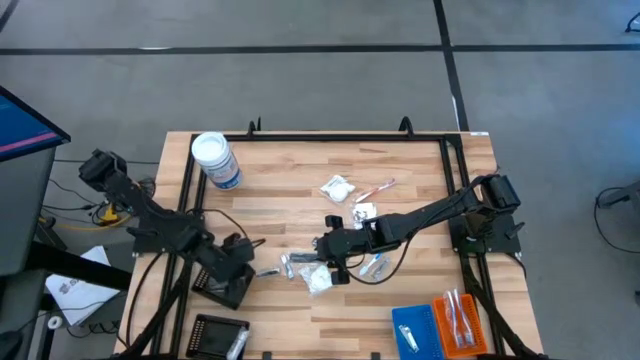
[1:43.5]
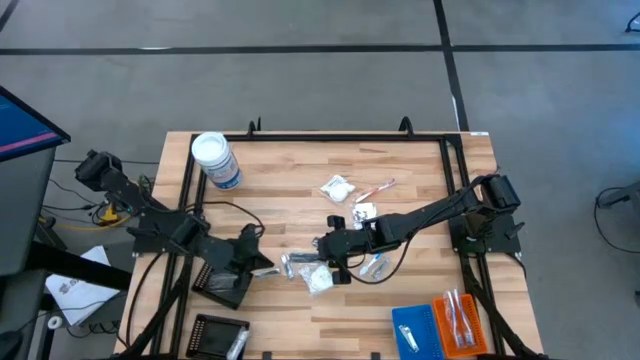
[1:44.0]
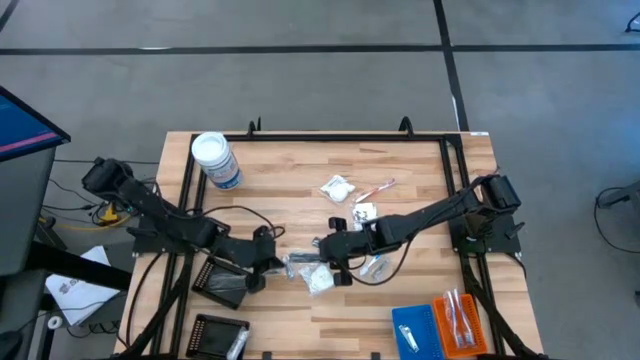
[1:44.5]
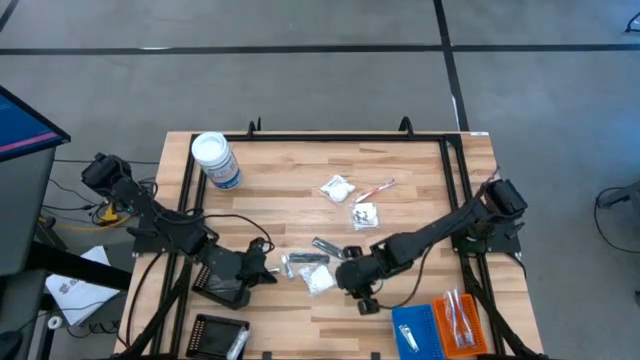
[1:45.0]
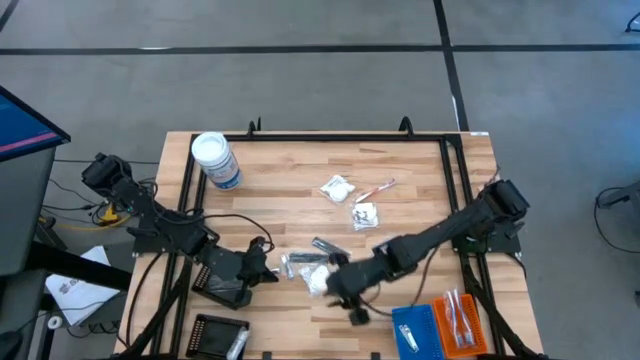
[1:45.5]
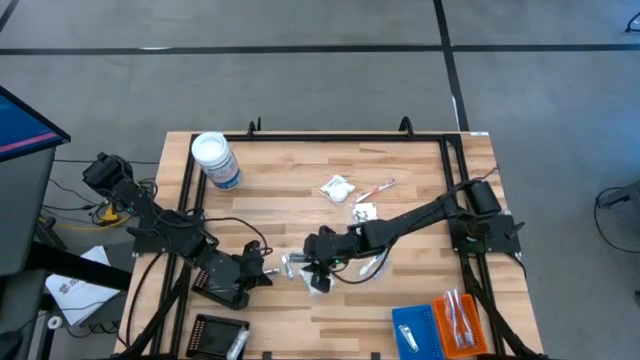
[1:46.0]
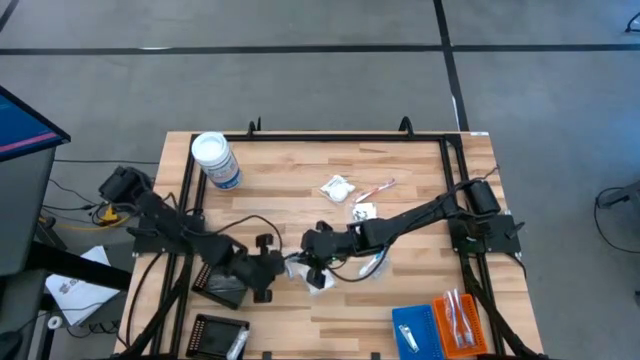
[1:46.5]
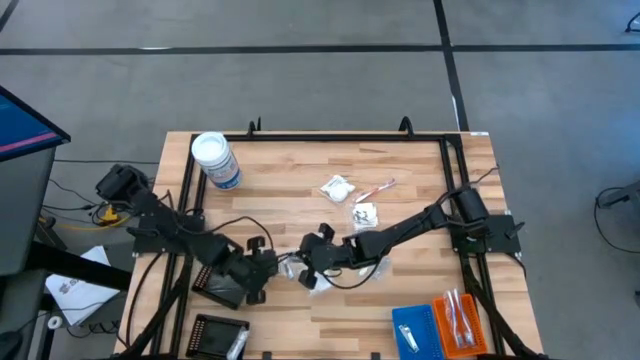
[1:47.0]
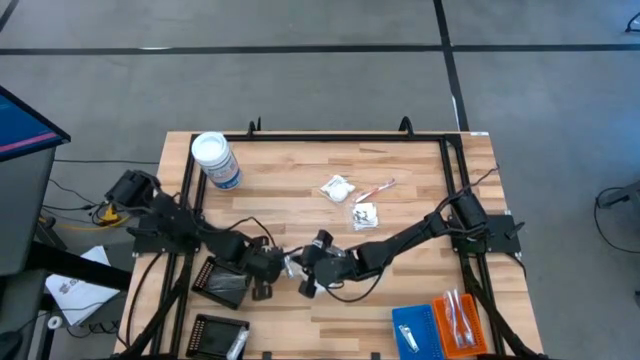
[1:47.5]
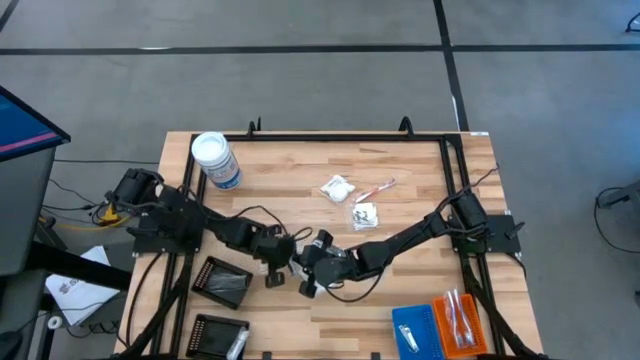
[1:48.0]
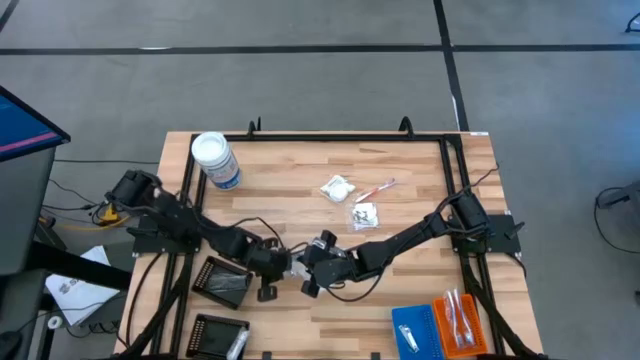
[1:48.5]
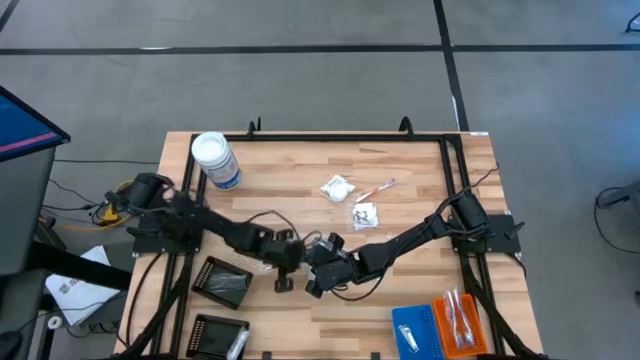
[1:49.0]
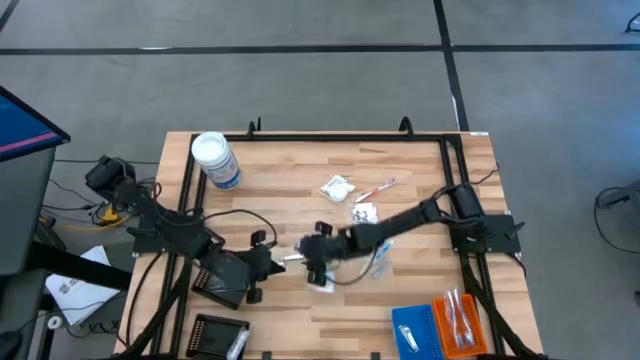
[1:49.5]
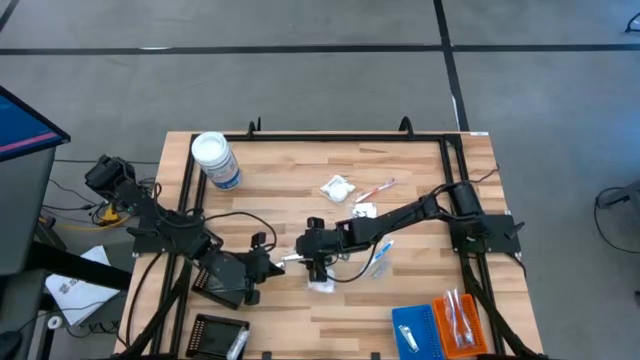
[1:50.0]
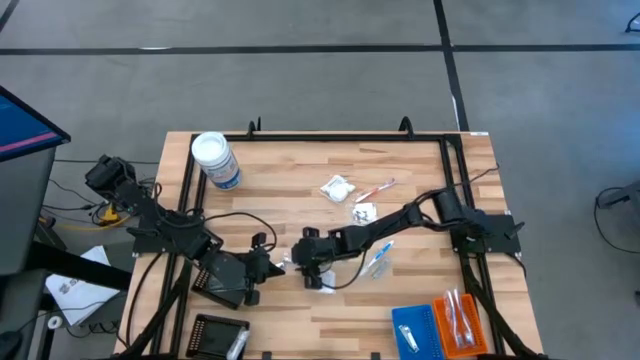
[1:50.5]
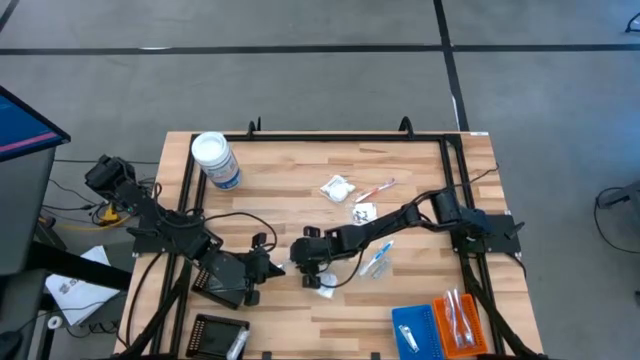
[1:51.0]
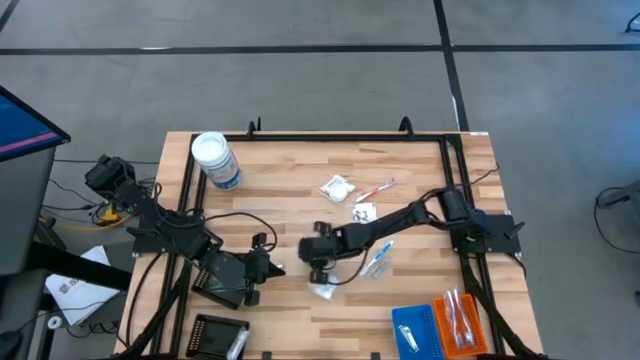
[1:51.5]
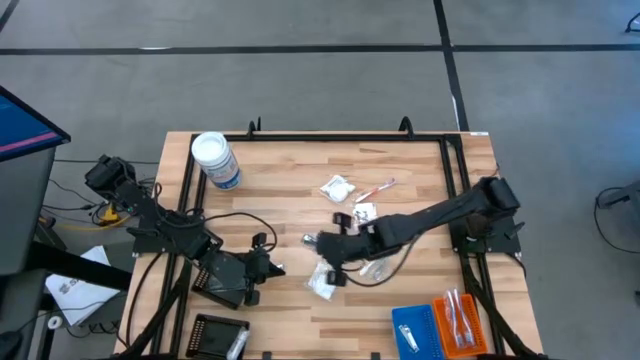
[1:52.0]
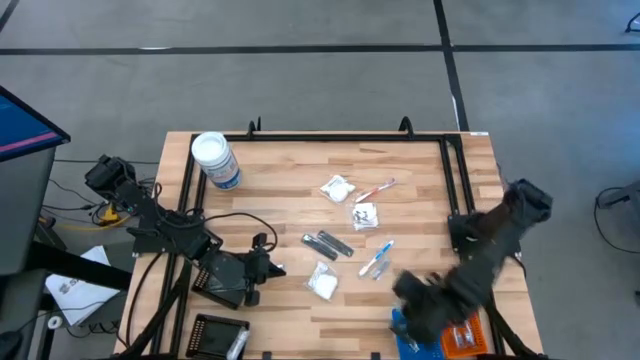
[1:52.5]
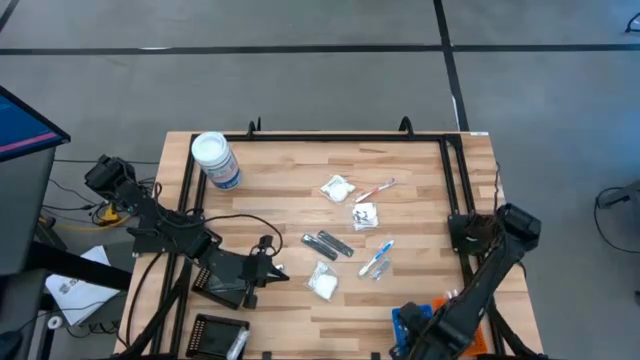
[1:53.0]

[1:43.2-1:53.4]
Task: Pick & Place Travel size toiletries
Put the nail cutter into the blue bin

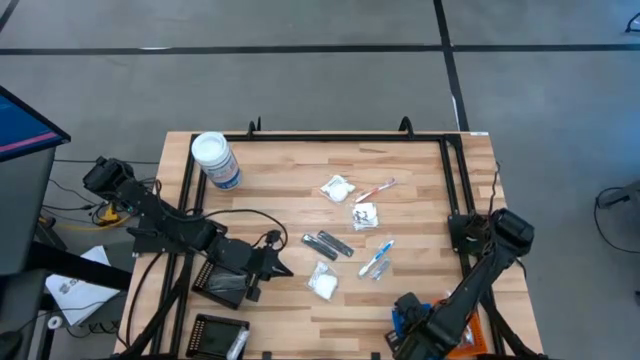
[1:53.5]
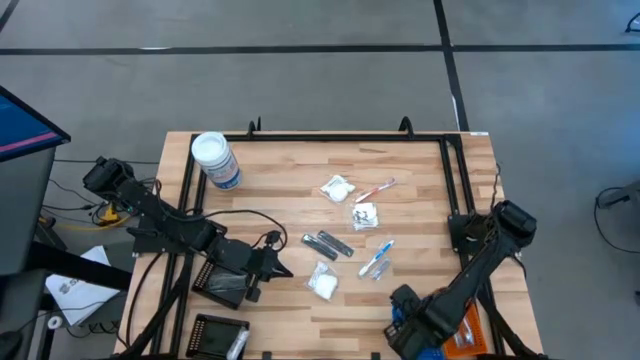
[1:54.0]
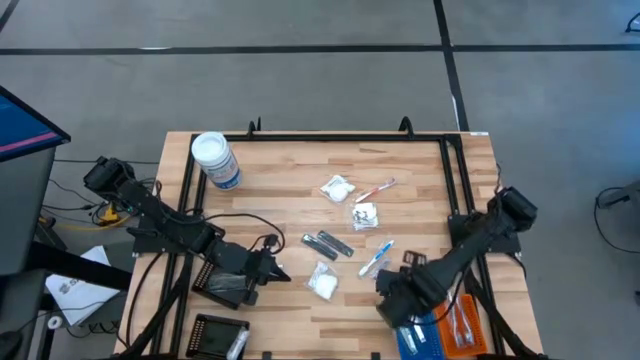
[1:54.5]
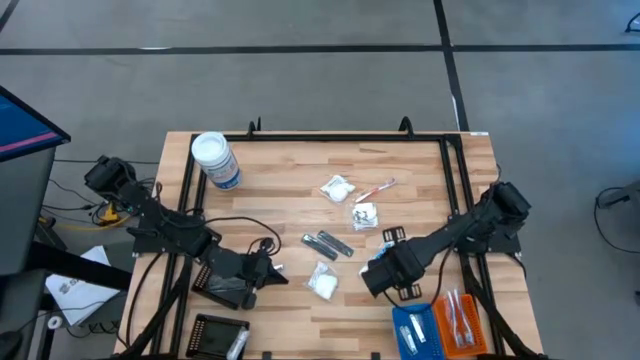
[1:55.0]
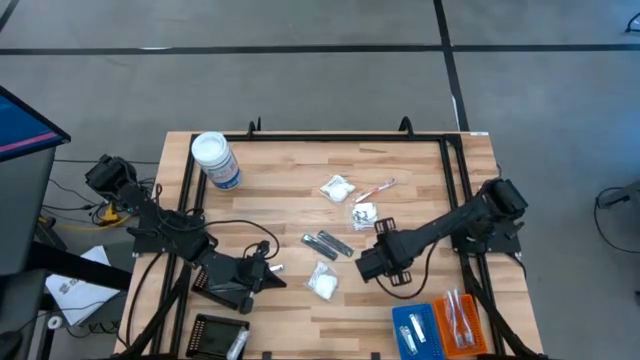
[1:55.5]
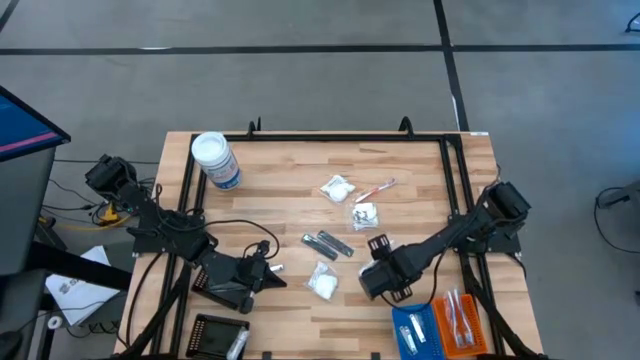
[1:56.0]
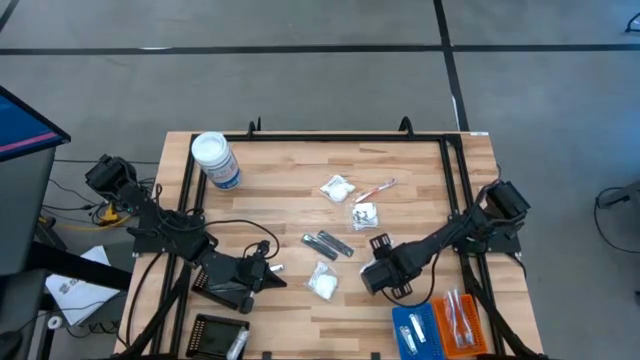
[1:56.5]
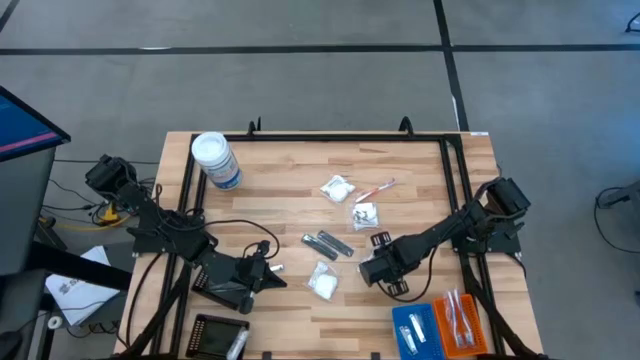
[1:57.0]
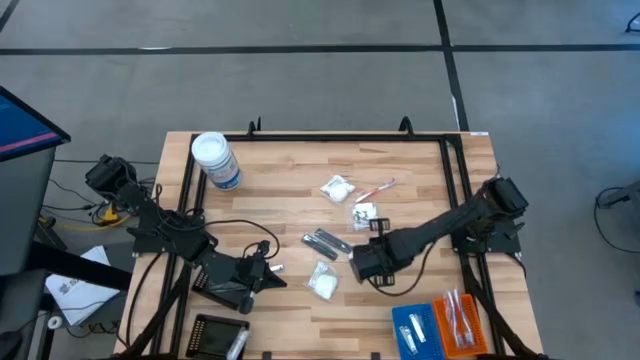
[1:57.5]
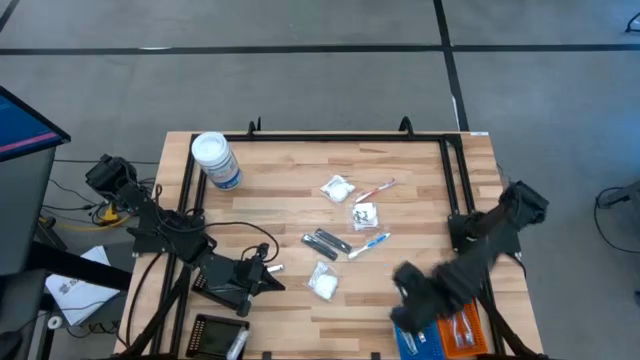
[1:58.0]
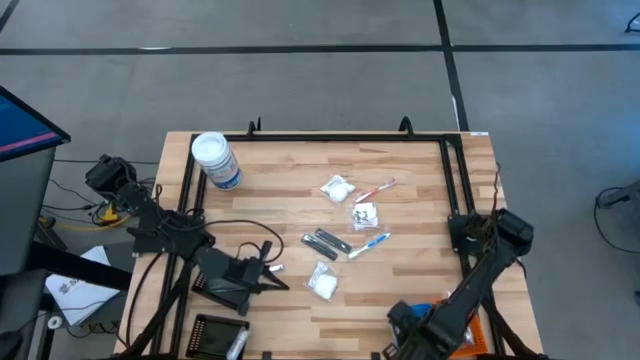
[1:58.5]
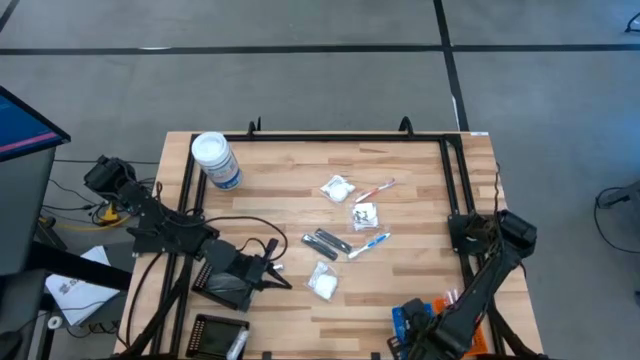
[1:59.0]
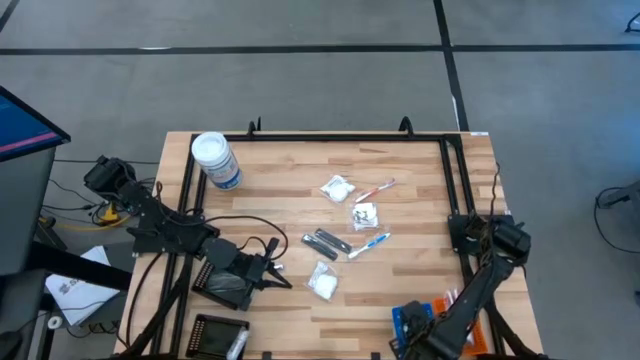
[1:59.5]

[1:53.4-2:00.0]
Put the nail cutter into the blue bin

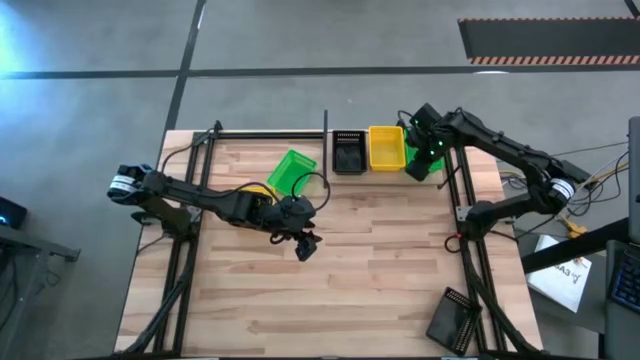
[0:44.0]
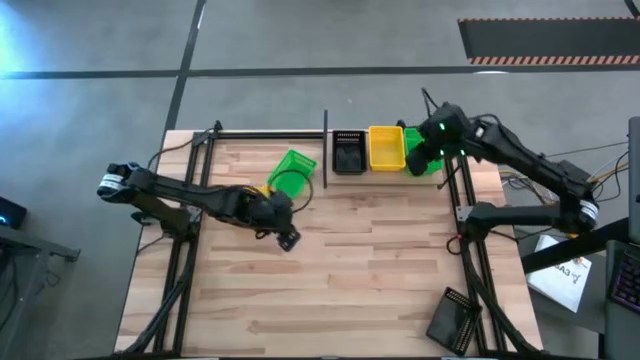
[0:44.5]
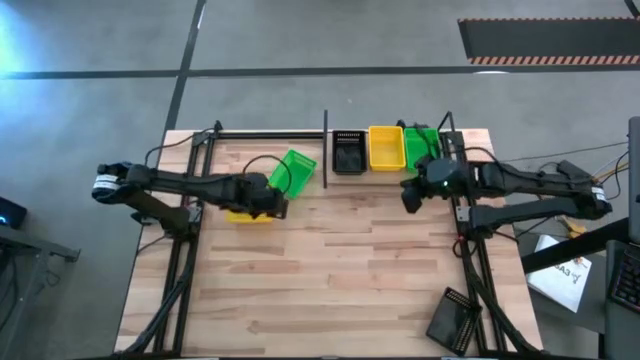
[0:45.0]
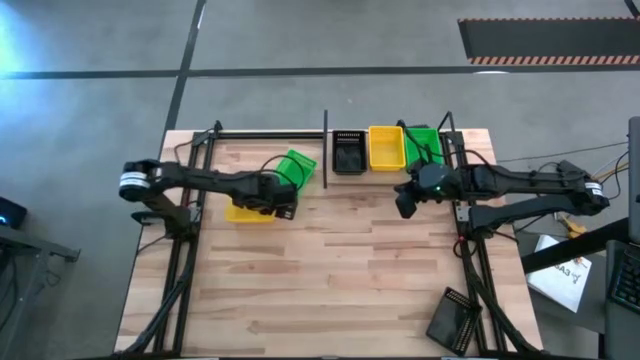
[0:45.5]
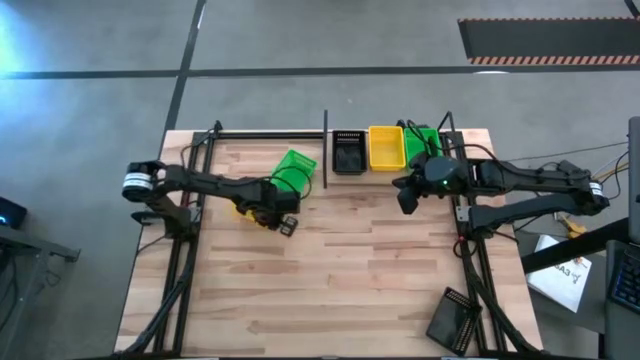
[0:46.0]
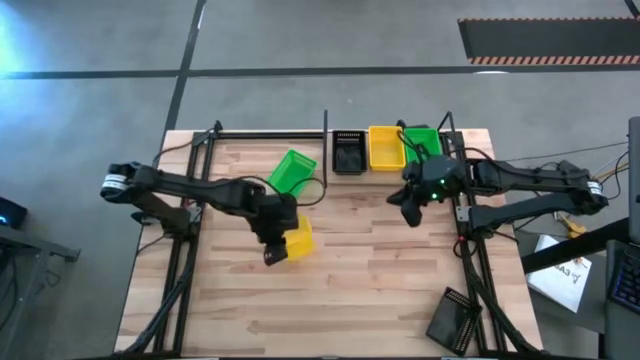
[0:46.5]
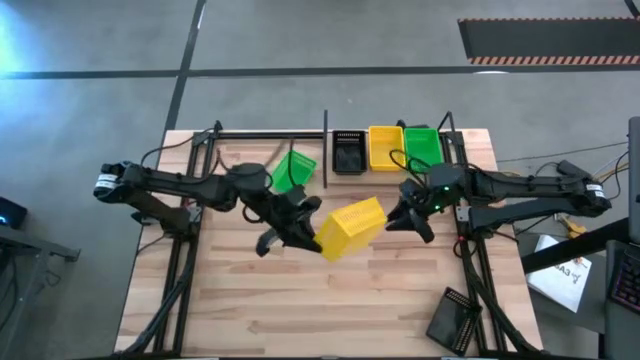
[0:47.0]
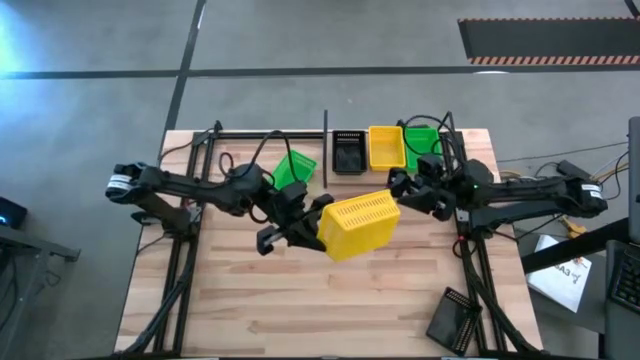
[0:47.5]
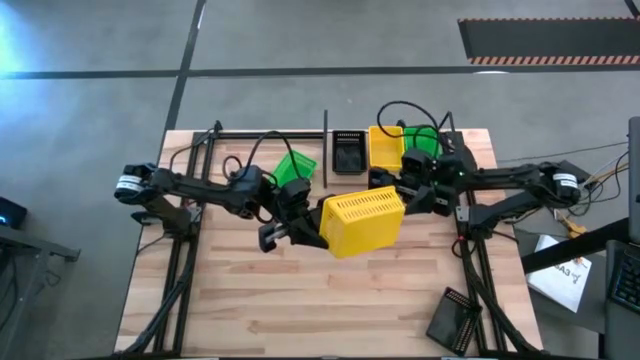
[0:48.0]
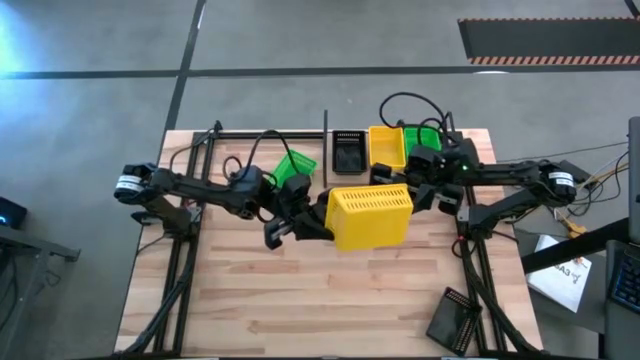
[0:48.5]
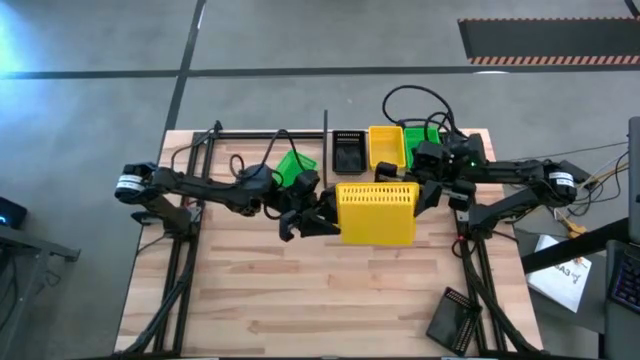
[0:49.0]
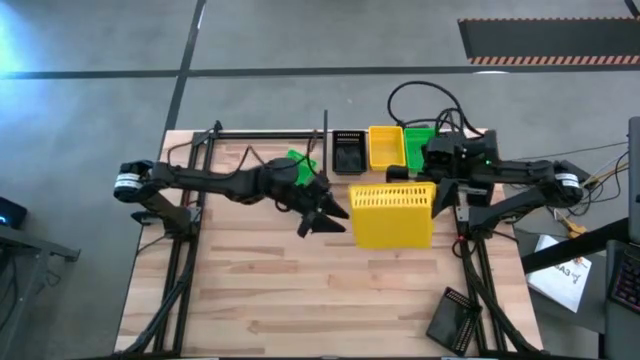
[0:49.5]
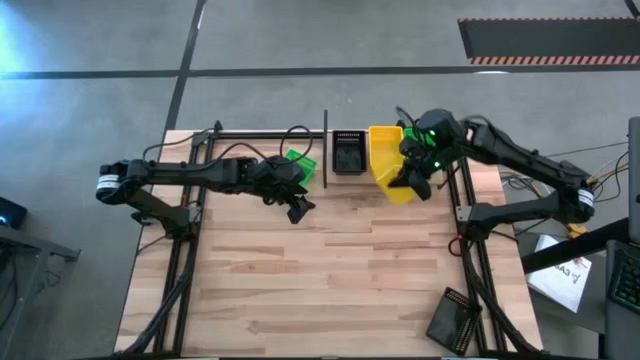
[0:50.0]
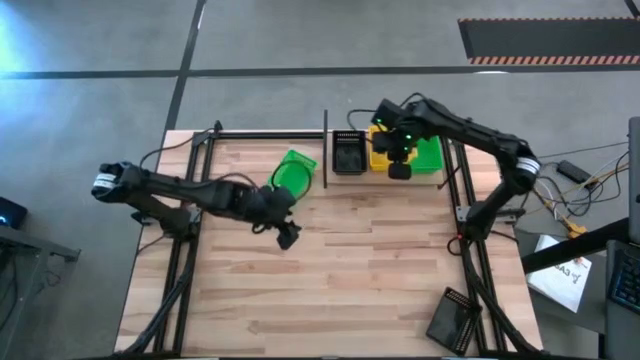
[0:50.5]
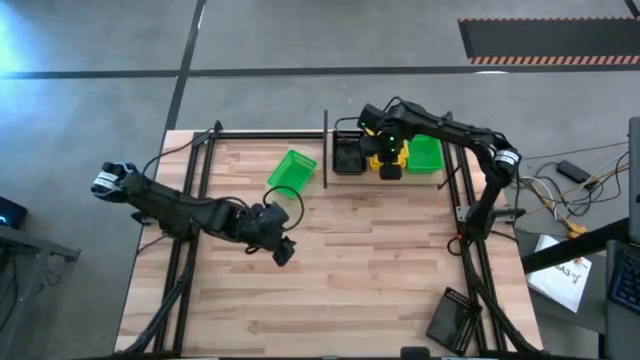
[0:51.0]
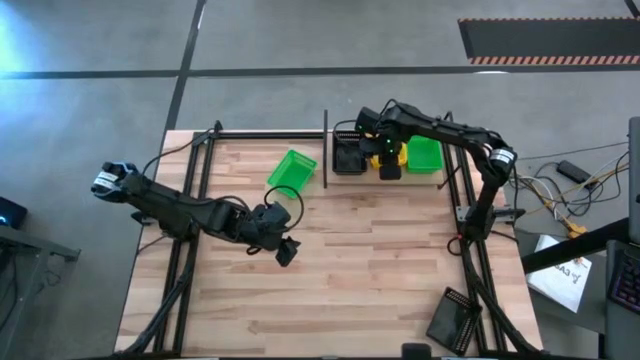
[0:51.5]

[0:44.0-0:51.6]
Task: Stack baskets on shelf by color
Stack the yellow bin on top of the yellow bins on the shelf
